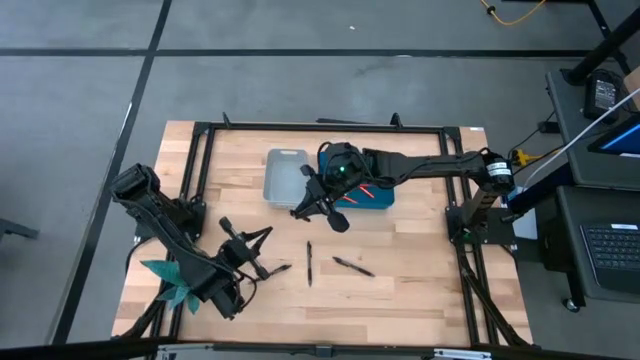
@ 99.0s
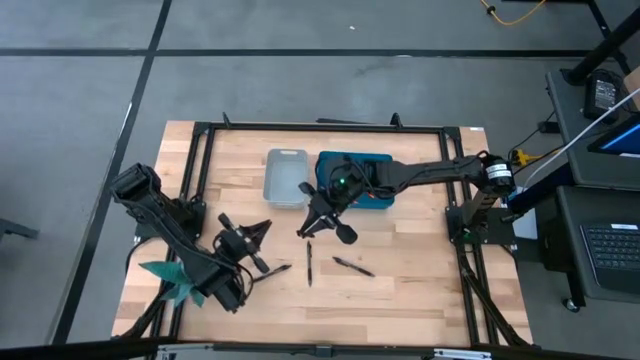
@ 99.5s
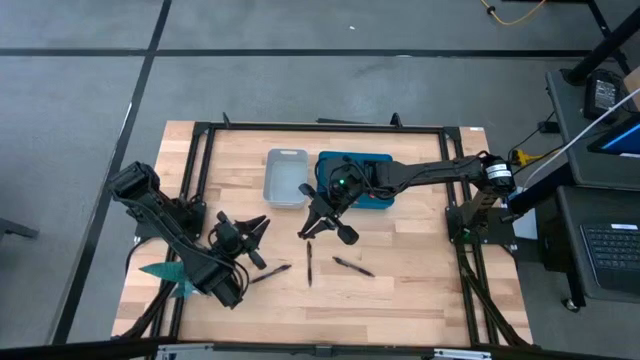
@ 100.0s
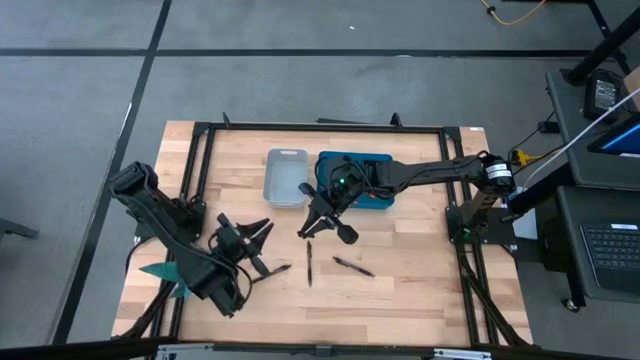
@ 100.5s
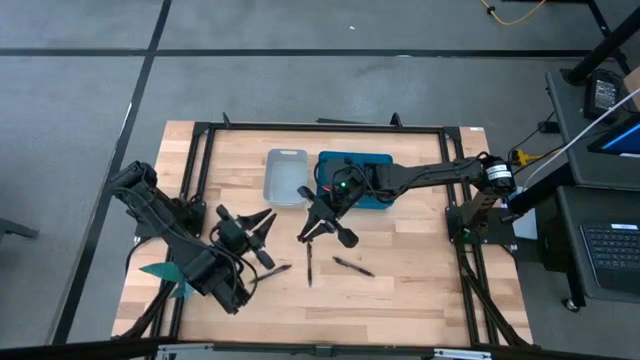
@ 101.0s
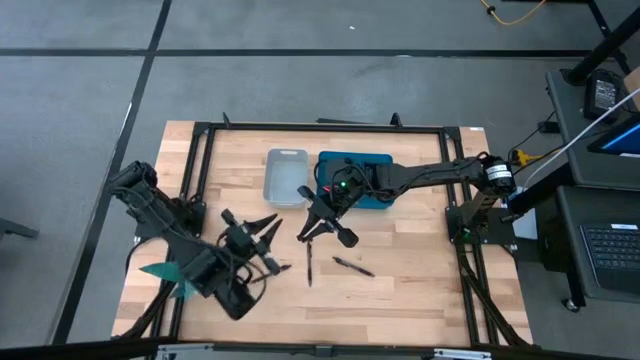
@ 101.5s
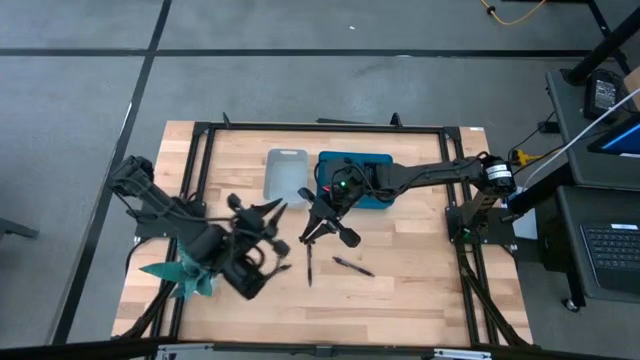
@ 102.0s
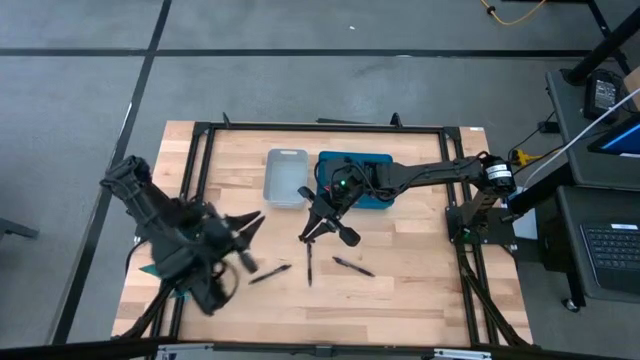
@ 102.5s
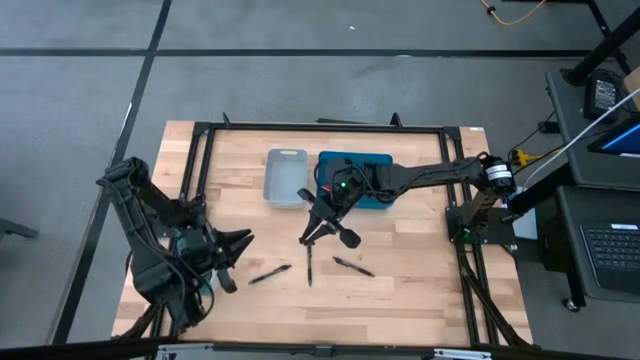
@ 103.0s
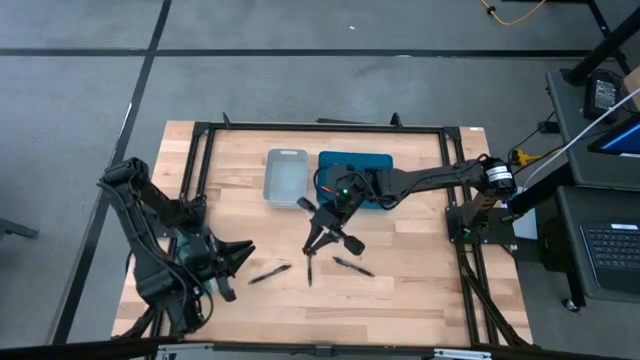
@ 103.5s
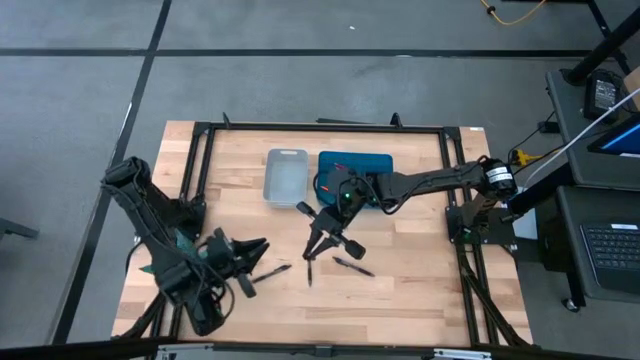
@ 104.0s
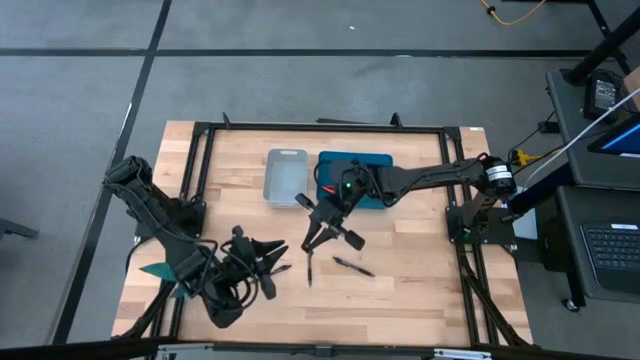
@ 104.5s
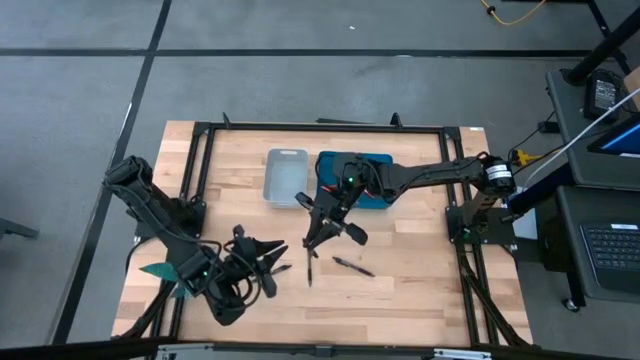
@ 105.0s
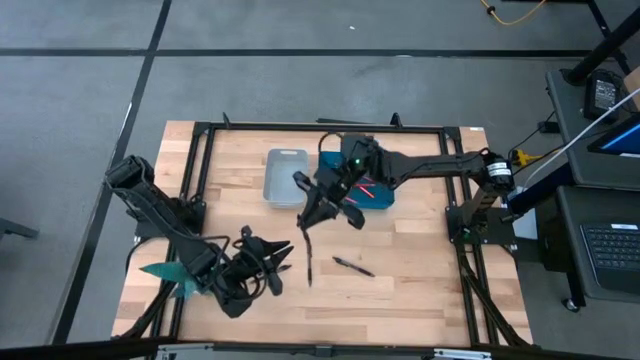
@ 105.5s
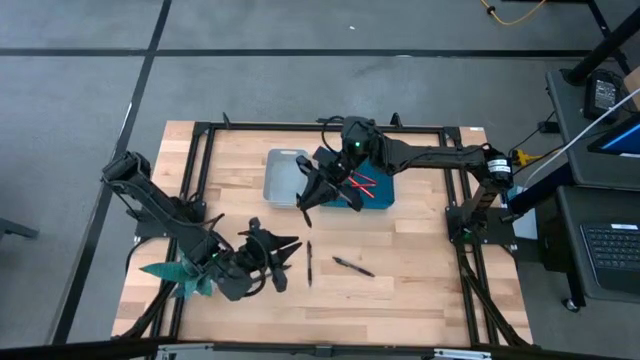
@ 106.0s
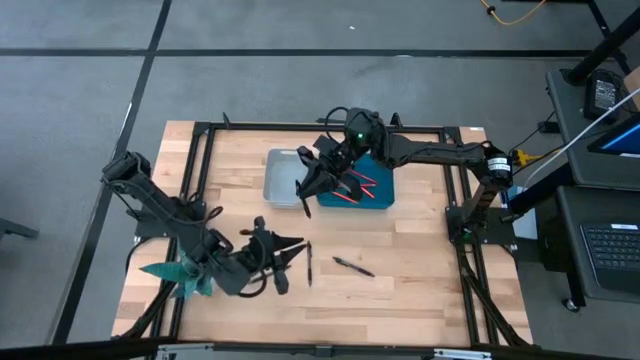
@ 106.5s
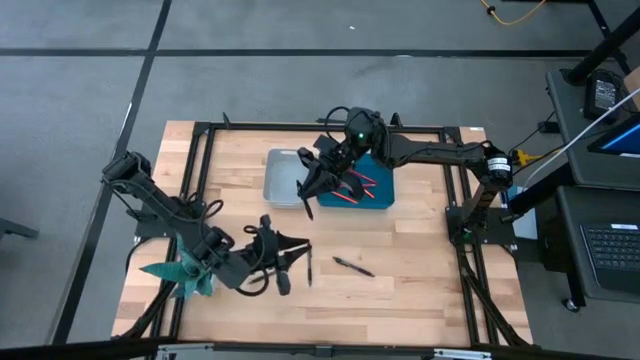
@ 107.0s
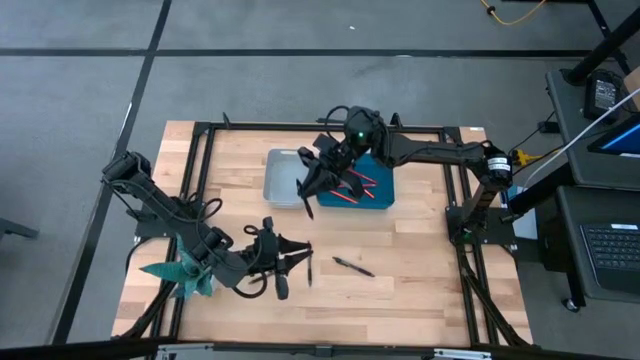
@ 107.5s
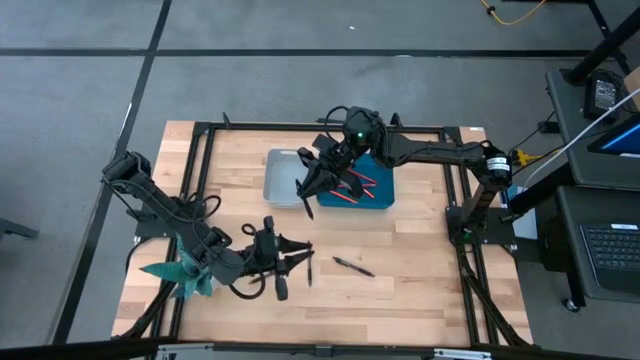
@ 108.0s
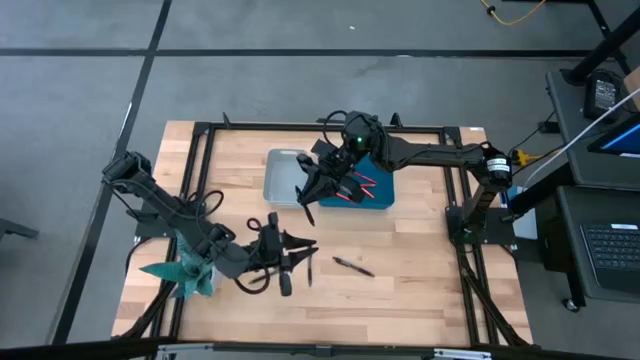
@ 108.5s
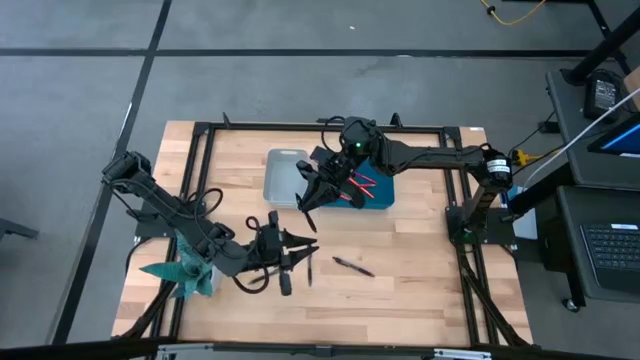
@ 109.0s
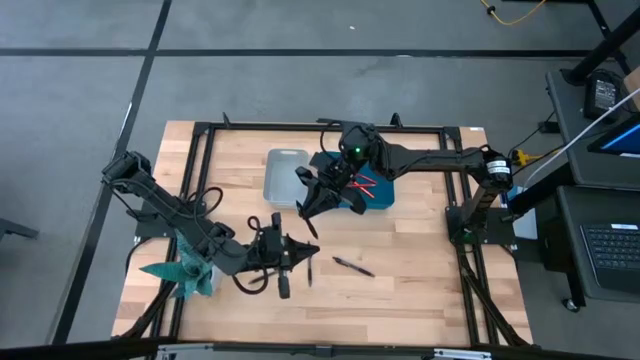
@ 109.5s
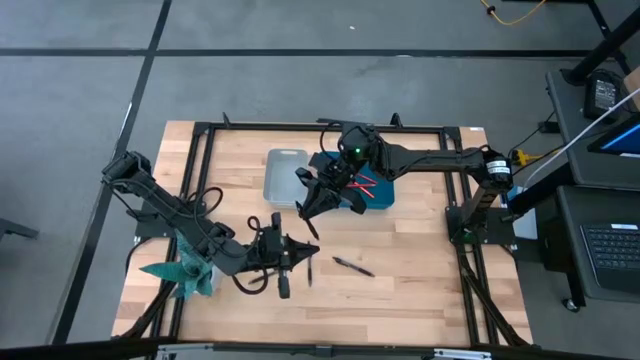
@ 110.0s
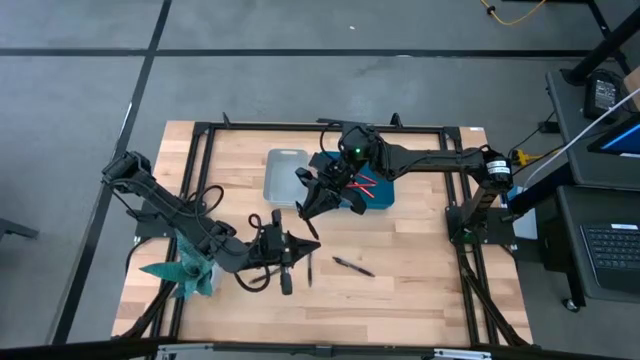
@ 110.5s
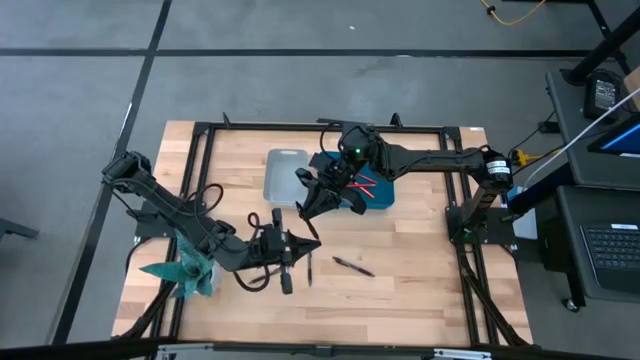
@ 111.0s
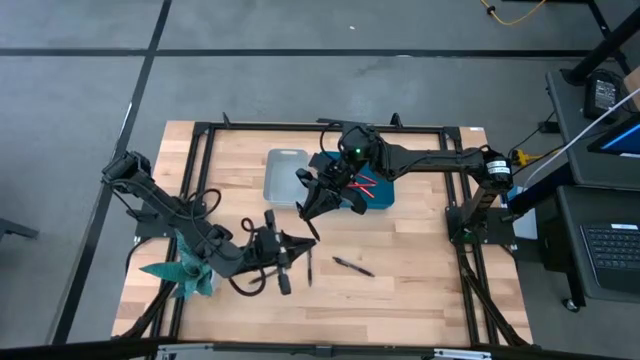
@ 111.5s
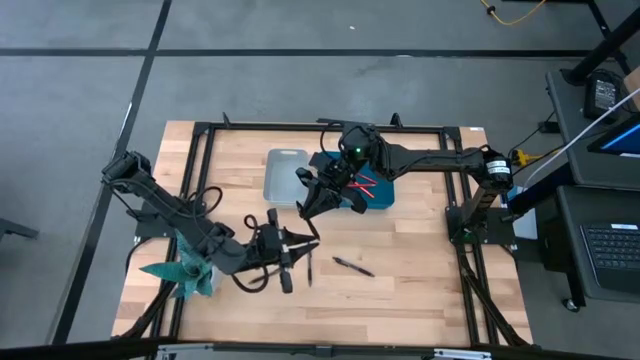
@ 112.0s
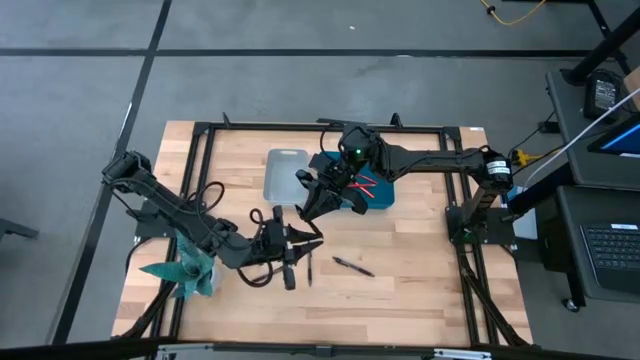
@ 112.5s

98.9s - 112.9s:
Task: Sort pens & pencils
Put the black pen into the gray bin

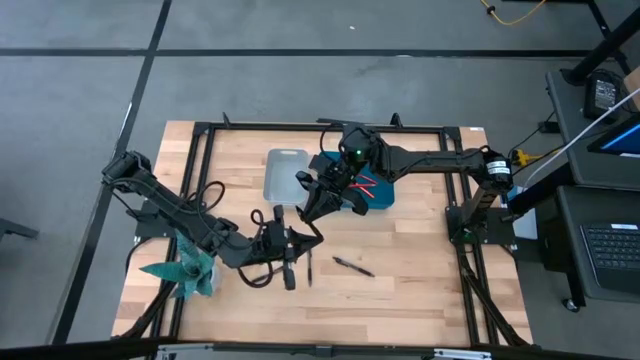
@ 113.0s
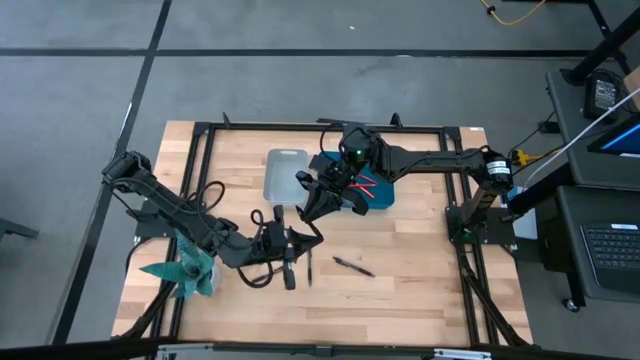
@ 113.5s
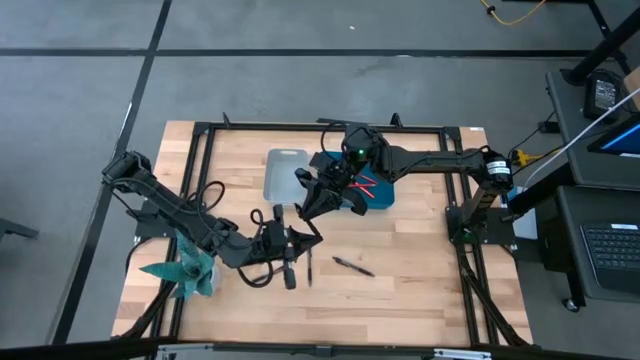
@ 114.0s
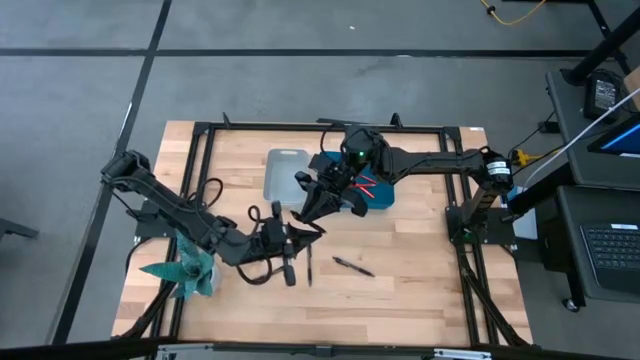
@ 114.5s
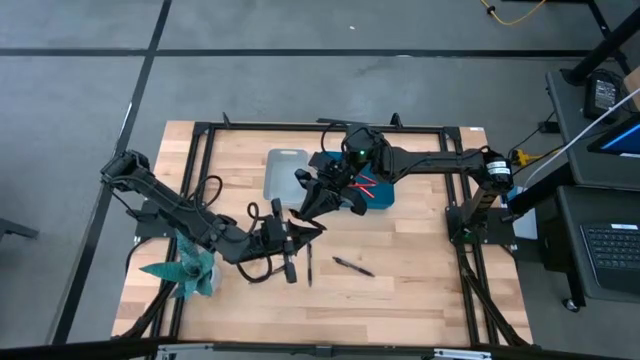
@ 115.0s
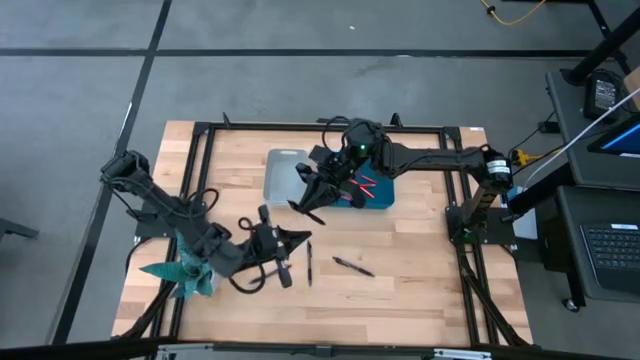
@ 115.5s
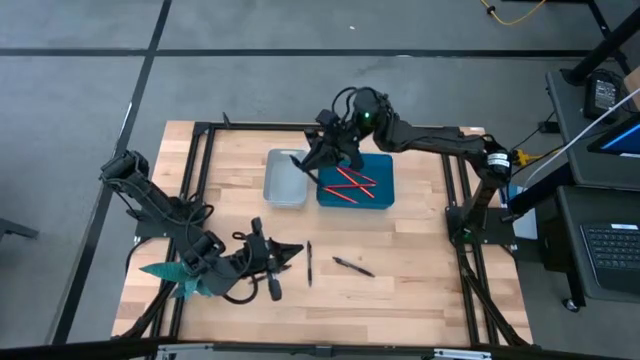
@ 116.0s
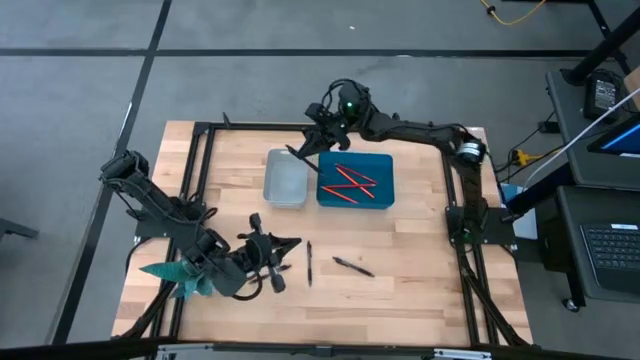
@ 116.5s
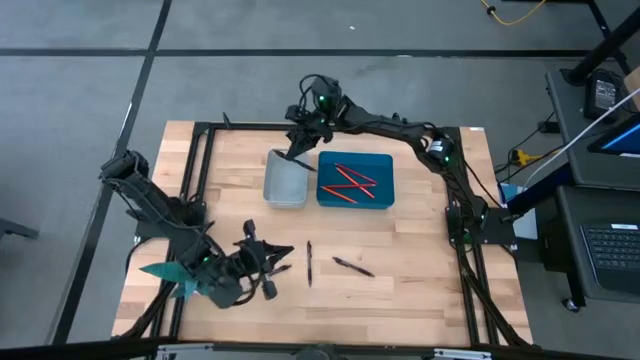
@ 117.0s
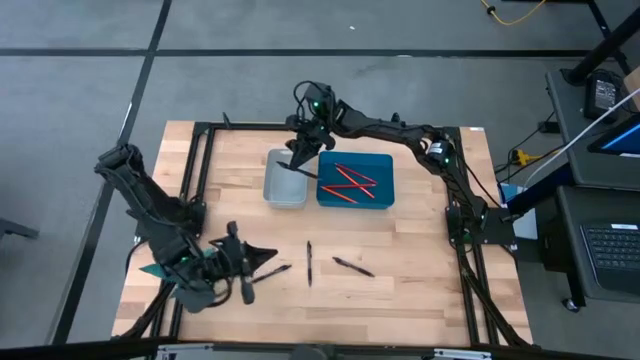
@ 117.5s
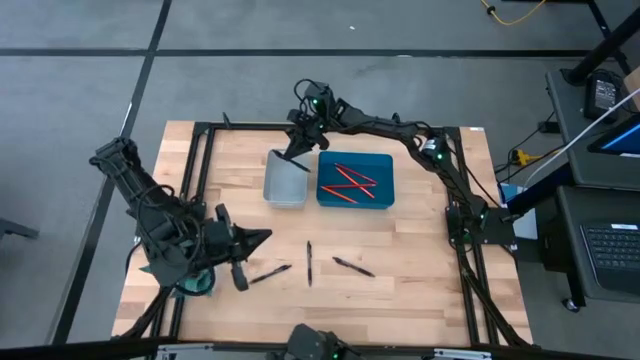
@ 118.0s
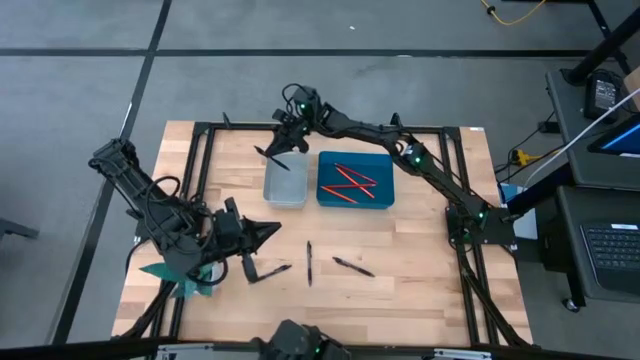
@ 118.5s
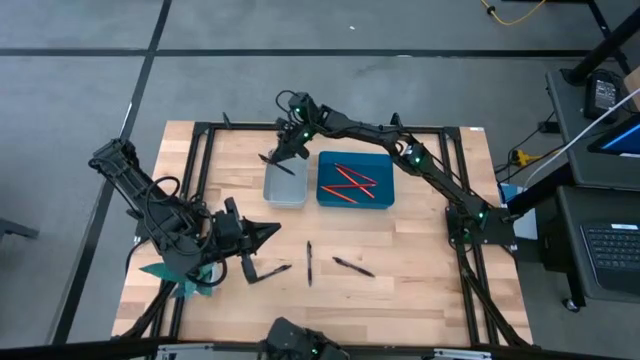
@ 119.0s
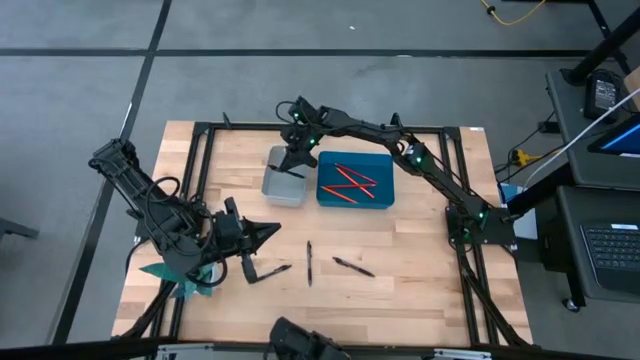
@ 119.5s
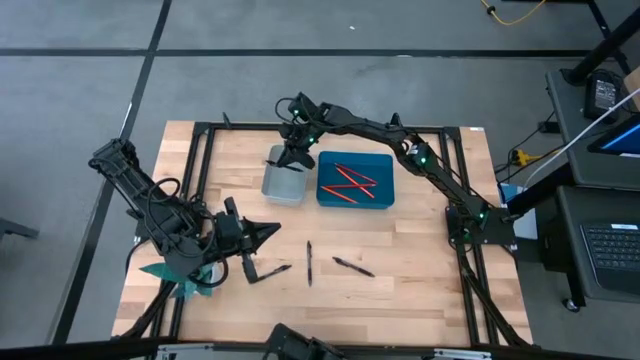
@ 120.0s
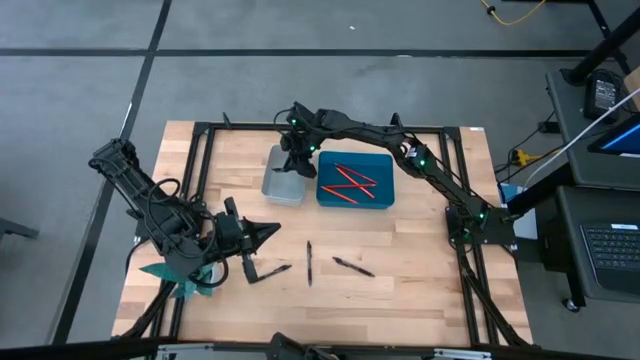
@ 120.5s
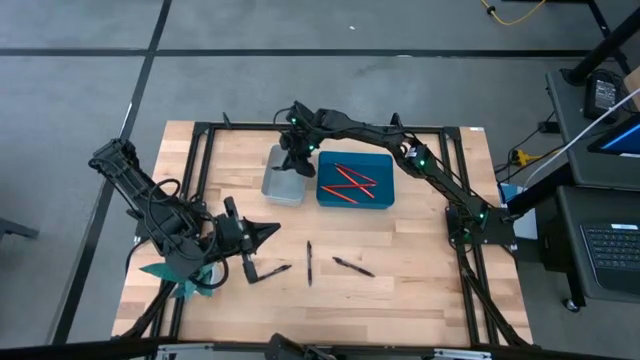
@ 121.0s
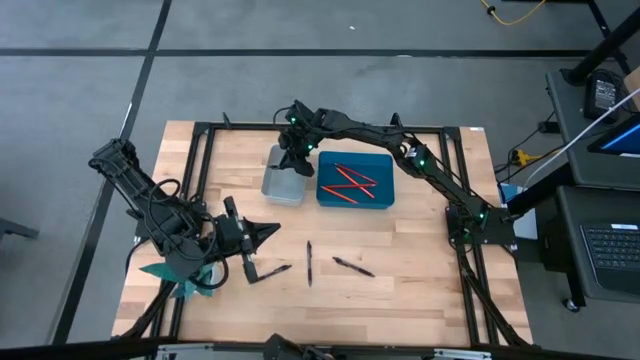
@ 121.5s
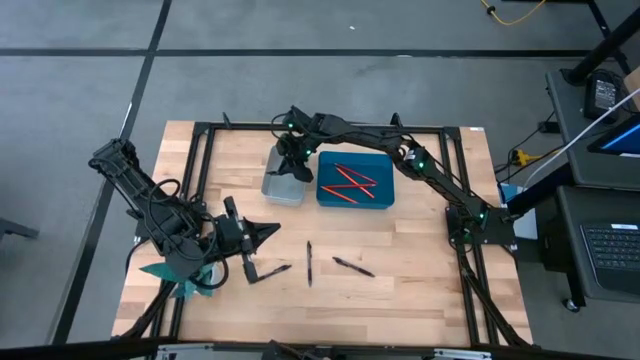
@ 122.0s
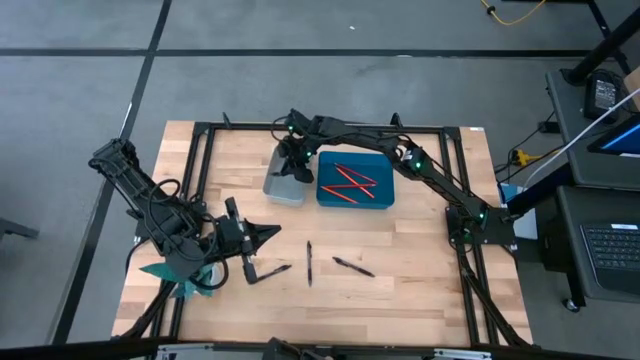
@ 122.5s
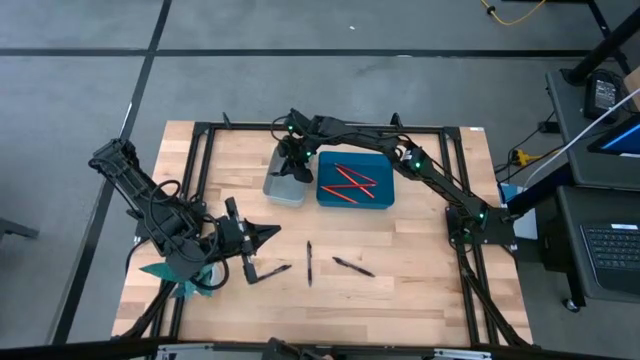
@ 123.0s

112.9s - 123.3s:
Put the black pen into the gray bin
